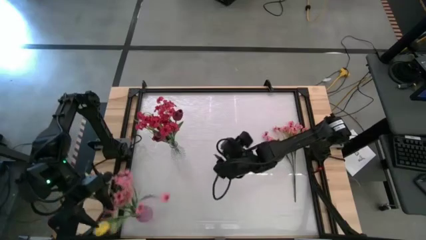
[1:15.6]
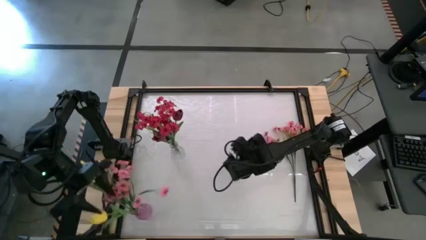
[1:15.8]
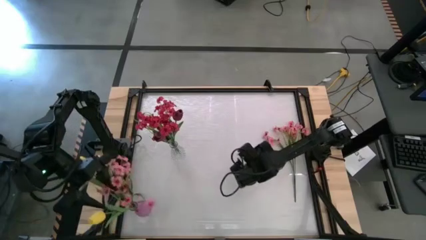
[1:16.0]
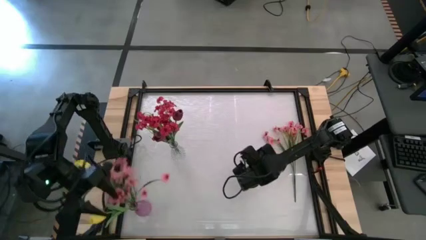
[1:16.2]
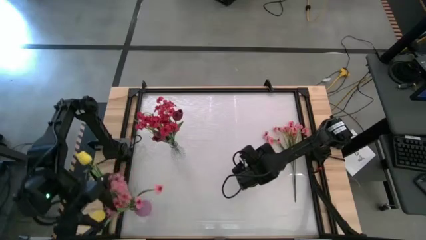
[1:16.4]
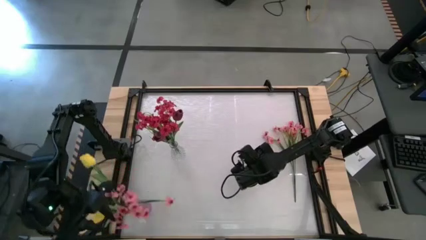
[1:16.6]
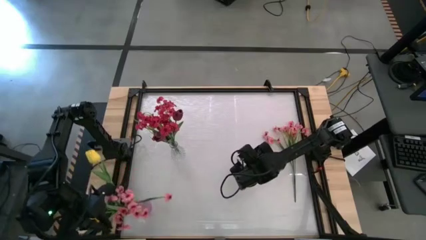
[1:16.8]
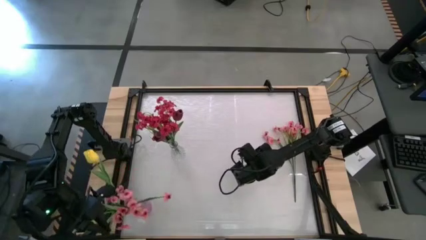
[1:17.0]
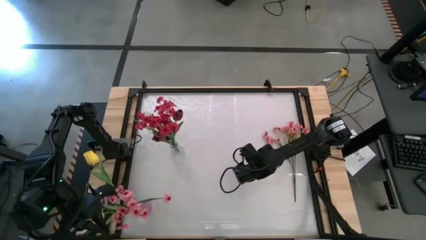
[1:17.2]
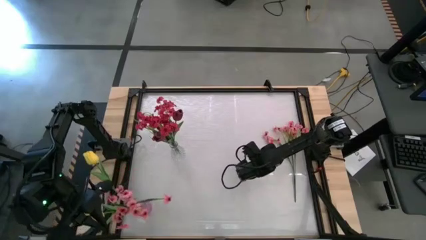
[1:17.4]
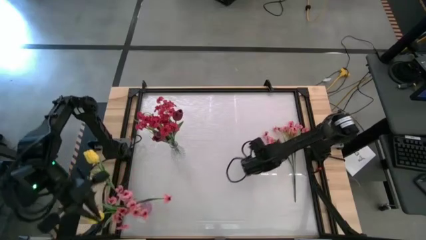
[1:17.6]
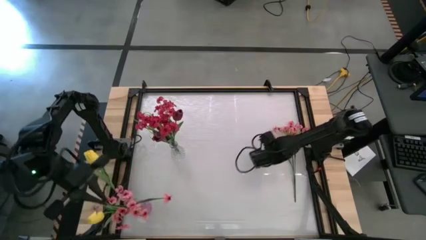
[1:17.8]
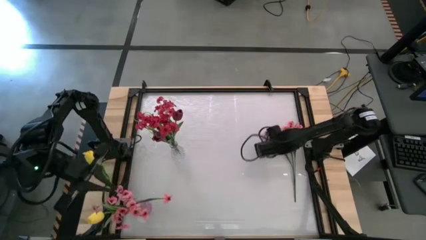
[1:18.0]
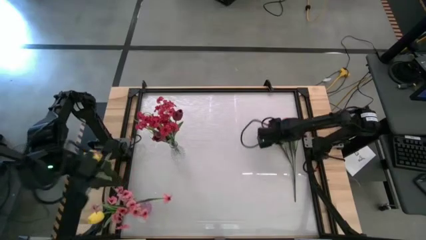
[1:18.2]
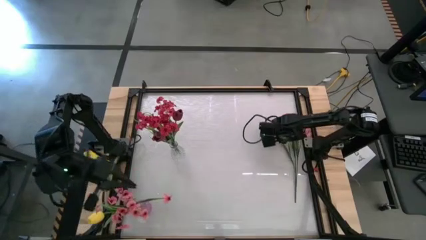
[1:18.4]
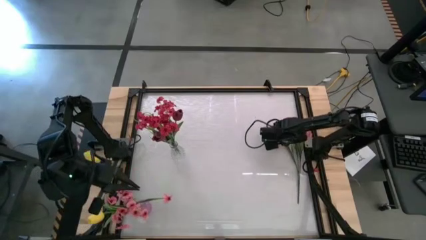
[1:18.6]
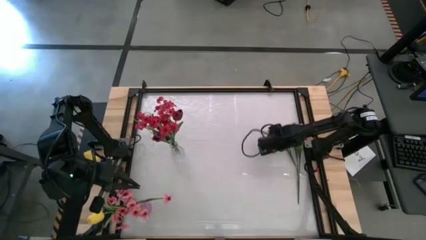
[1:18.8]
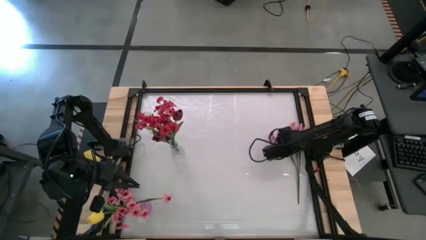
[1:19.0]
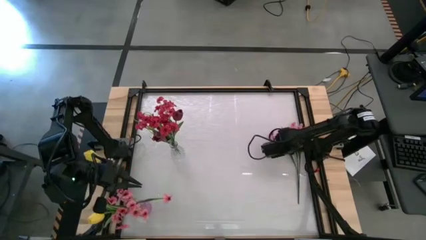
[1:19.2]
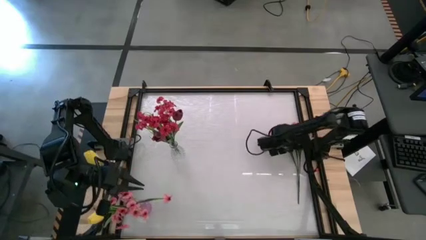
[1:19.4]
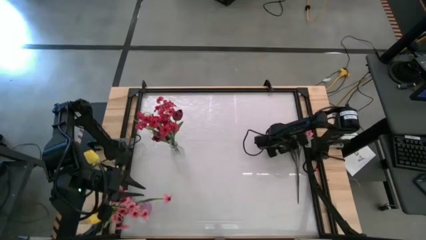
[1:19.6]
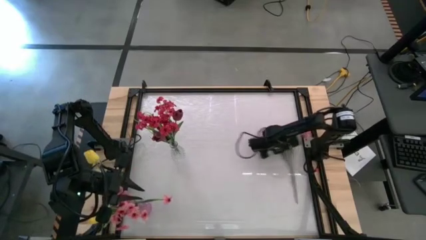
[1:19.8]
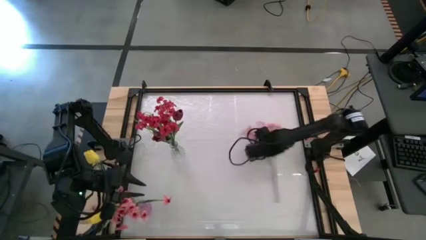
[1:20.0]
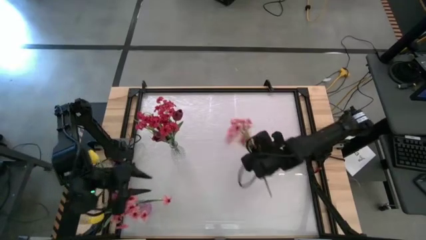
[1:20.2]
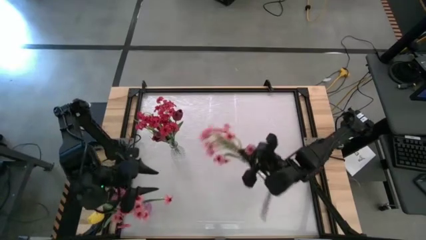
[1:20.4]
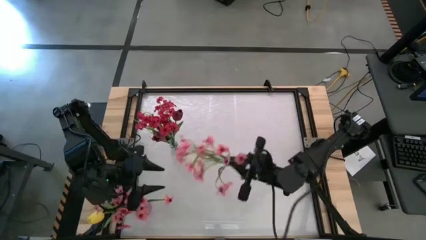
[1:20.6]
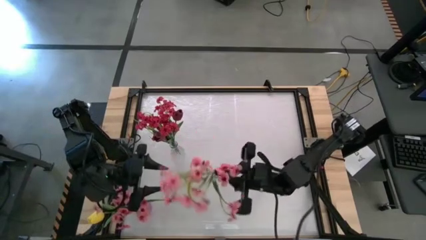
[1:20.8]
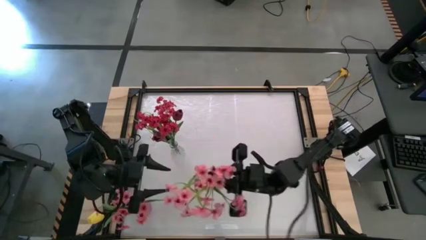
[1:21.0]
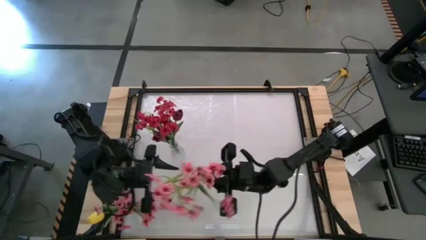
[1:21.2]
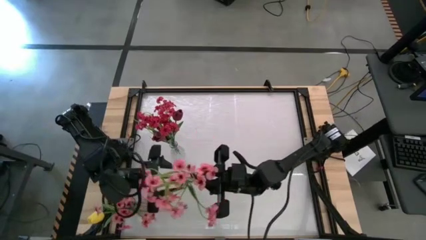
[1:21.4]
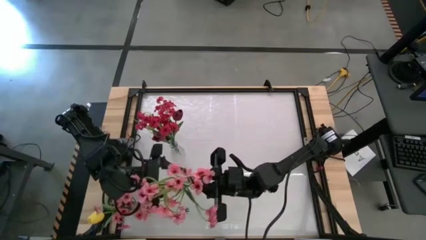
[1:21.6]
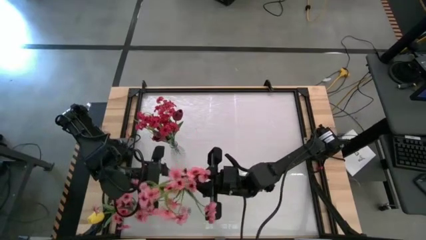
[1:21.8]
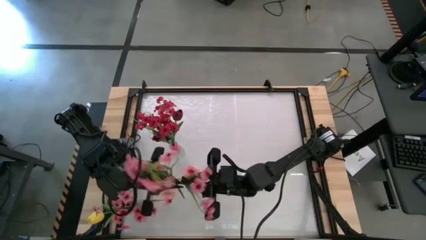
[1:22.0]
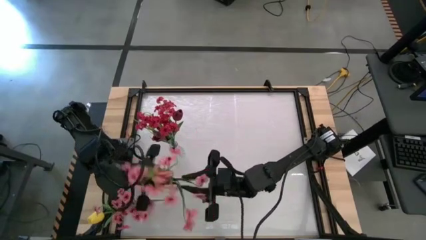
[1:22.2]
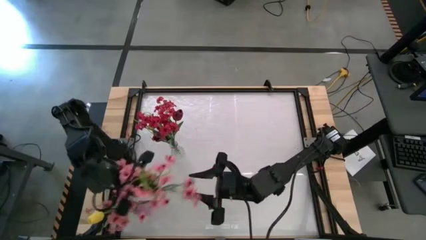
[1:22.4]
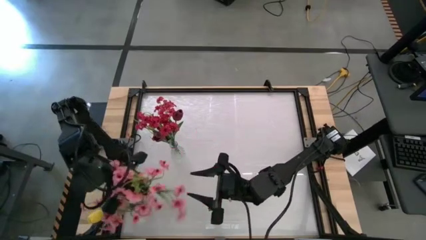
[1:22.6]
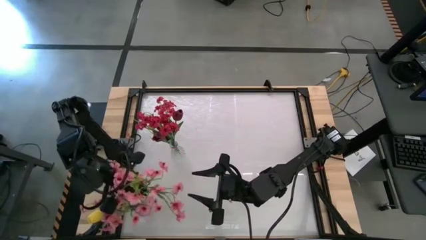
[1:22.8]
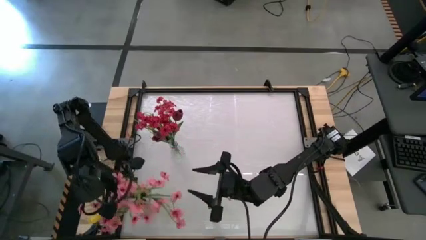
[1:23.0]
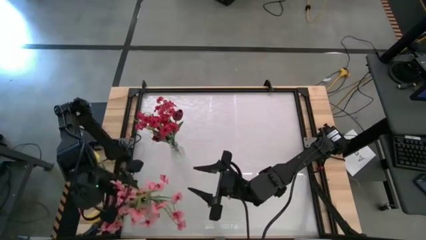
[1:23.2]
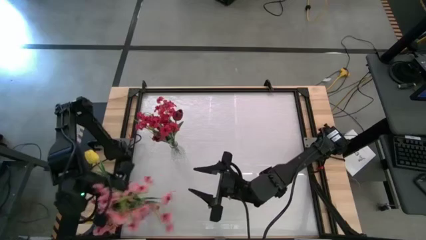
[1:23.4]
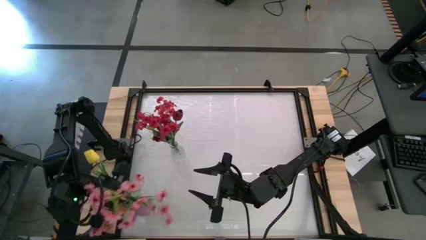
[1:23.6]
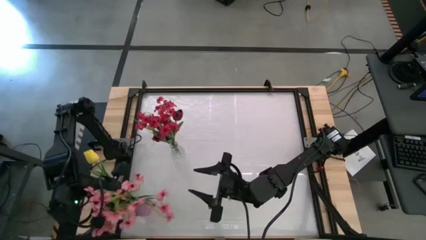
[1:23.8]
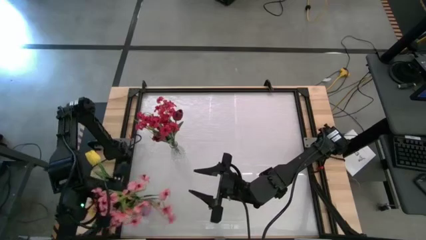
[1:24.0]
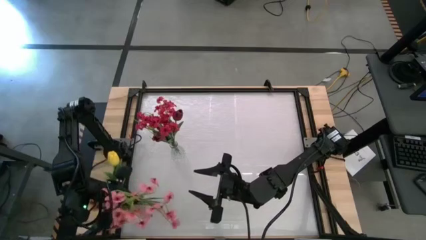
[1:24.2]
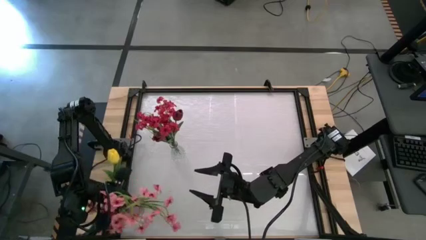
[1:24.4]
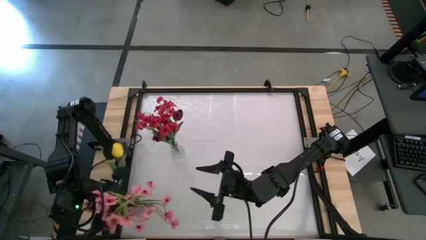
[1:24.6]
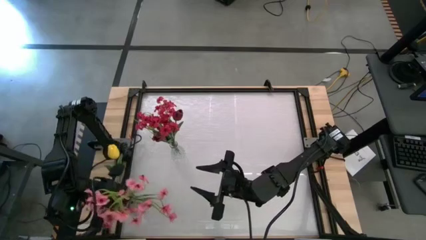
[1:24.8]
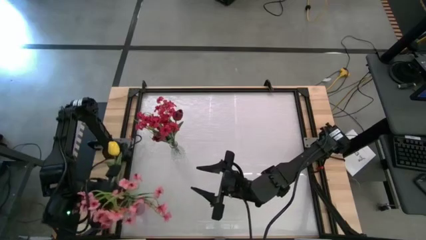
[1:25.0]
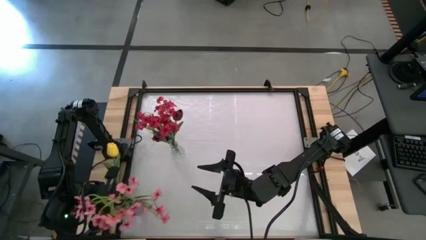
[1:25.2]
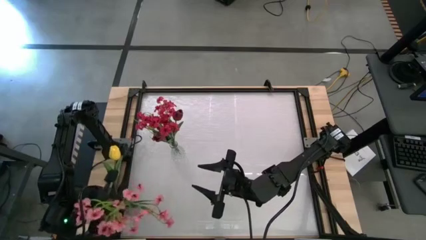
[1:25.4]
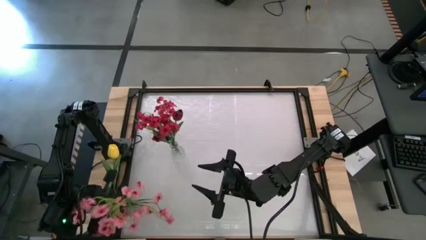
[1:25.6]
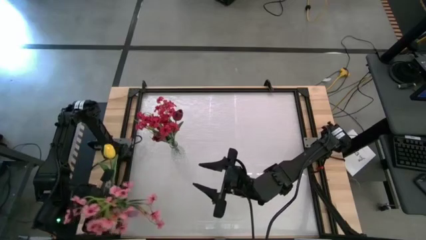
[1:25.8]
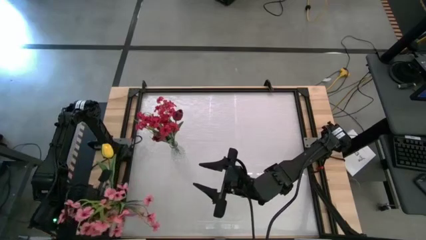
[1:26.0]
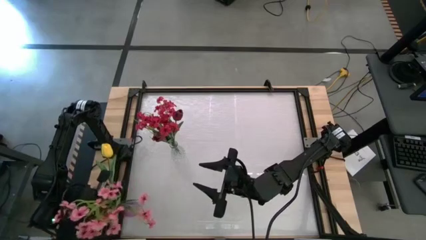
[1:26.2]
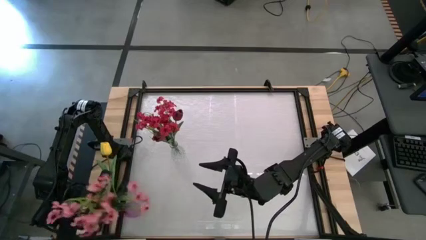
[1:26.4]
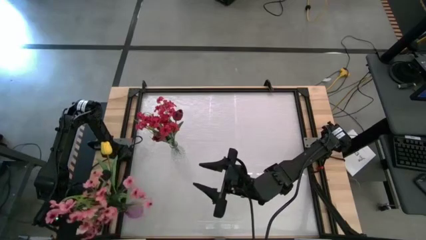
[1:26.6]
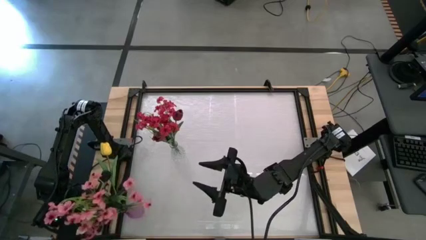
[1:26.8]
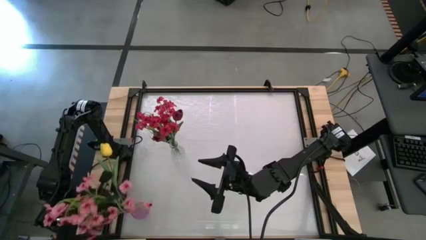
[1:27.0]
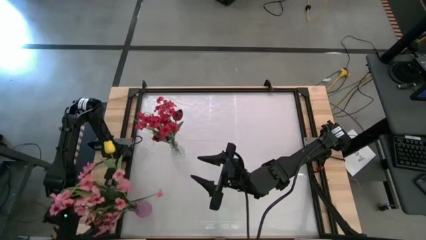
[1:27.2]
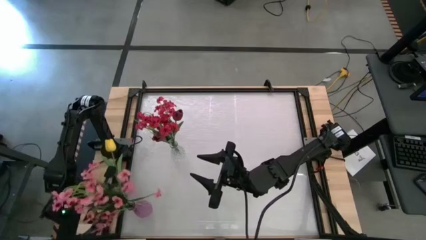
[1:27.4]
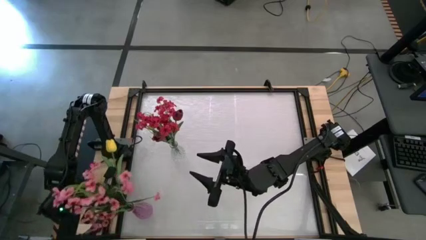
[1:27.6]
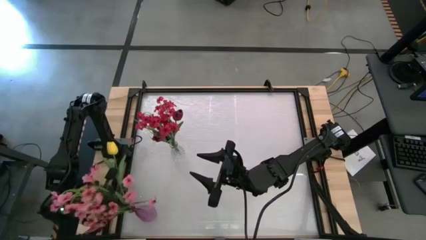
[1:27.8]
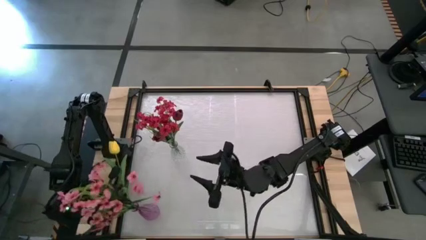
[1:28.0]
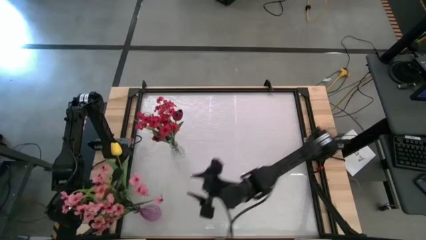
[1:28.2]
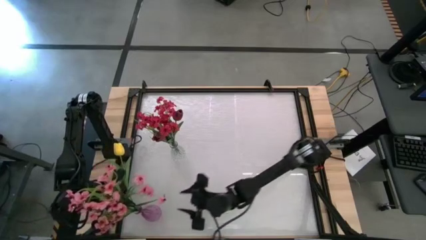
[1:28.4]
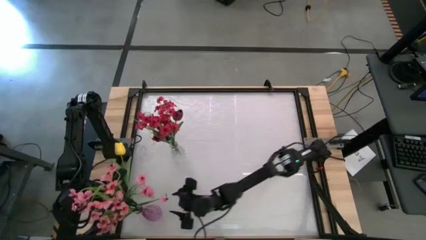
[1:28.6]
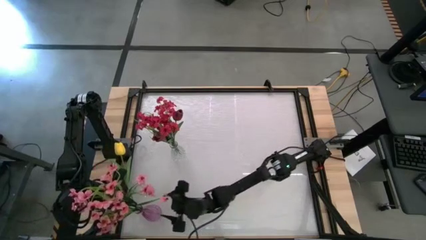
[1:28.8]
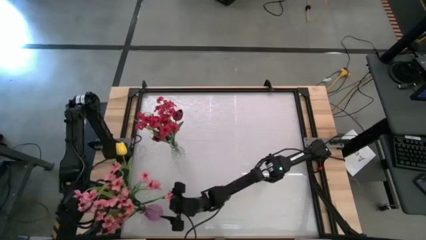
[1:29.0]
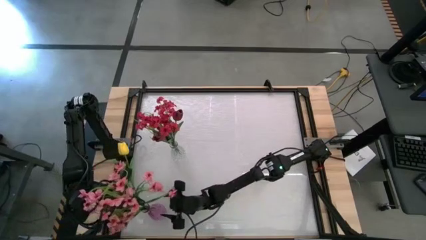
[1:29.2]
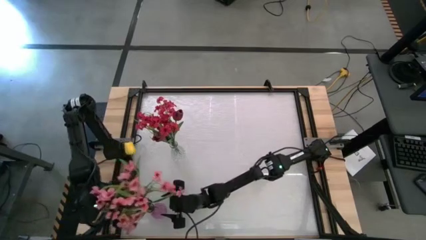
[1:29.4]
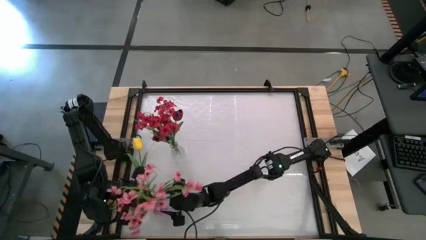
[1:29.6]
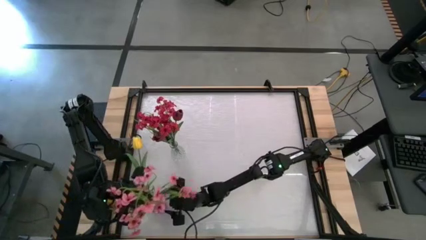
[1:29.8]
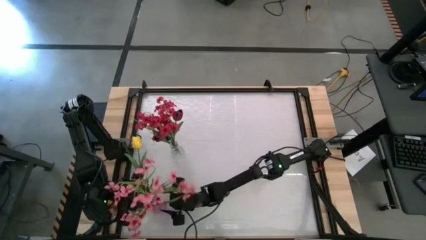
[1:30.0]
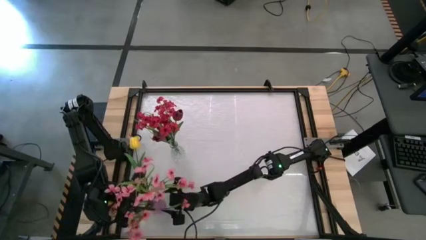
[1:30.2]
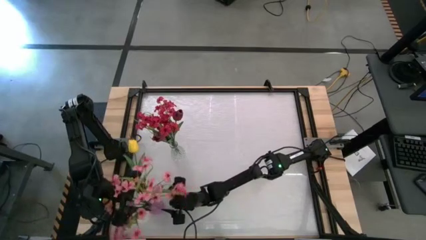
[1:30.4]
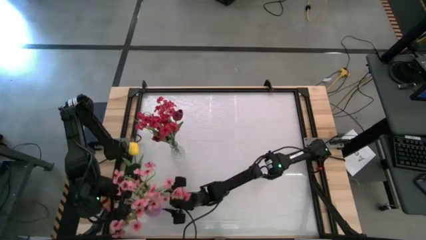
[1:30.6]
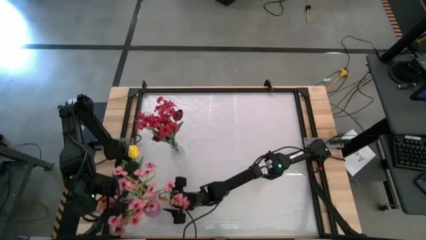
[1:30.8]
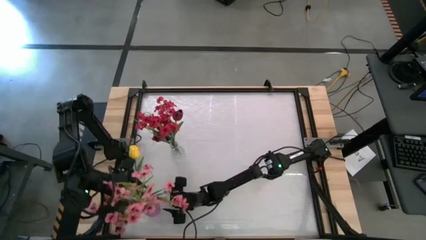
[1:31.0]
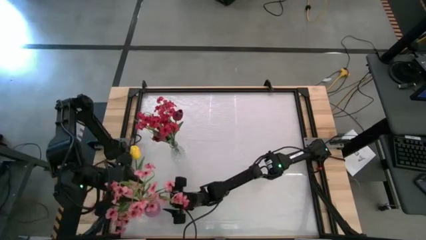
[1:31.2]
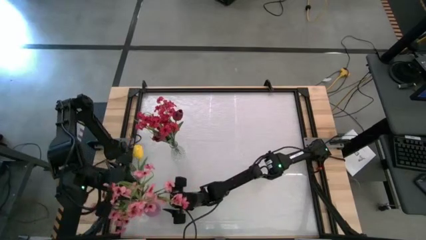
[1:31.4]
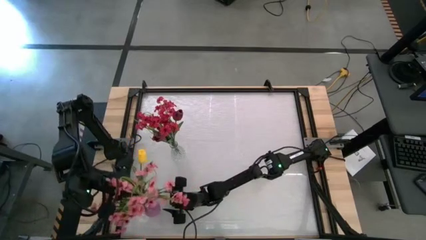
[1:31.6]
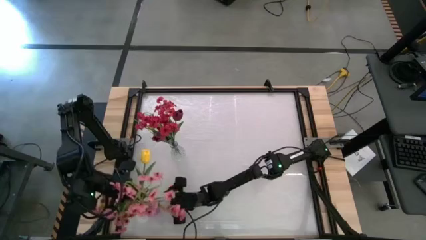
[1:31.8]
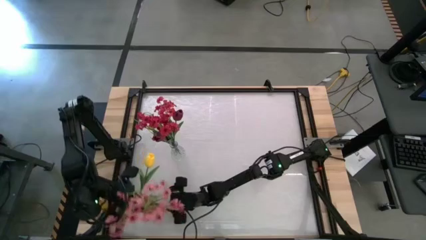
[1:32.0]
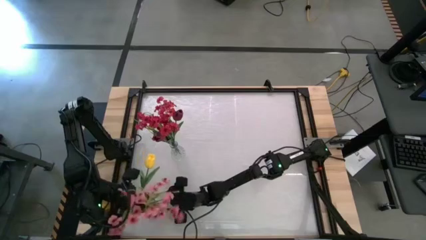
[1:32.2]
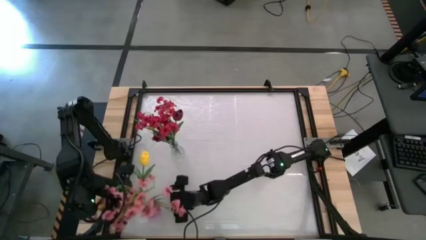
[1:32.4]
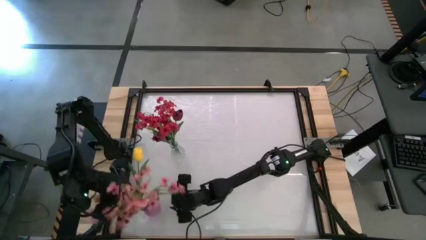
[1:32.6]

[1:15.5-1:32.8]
Task: Sort flowers into vase by color
Put the pink flower into the purple vase
